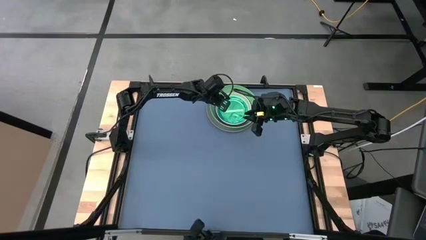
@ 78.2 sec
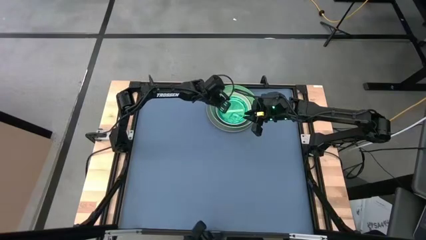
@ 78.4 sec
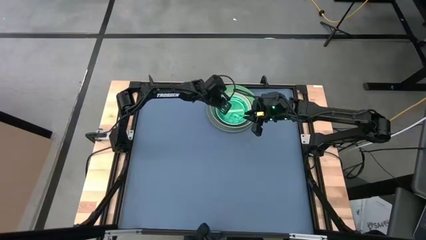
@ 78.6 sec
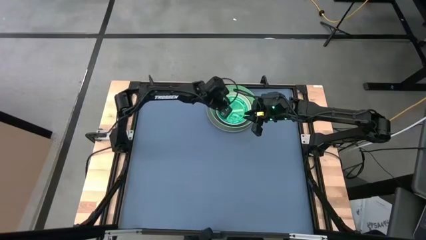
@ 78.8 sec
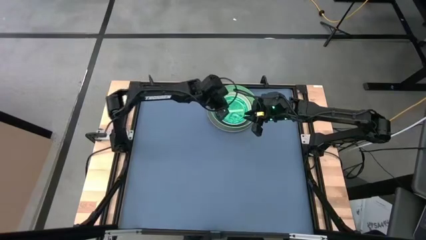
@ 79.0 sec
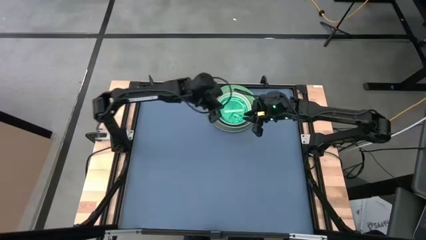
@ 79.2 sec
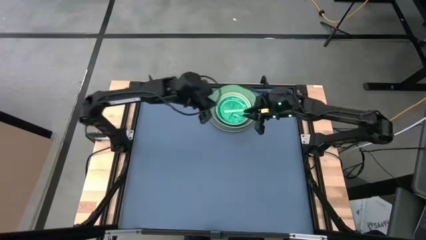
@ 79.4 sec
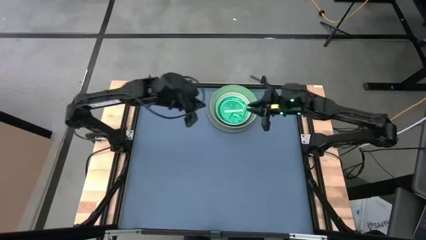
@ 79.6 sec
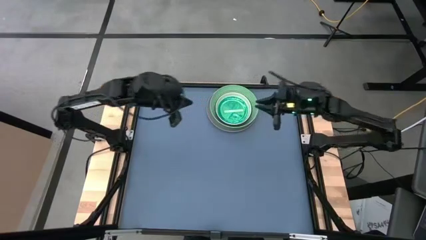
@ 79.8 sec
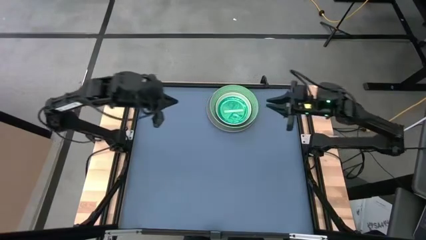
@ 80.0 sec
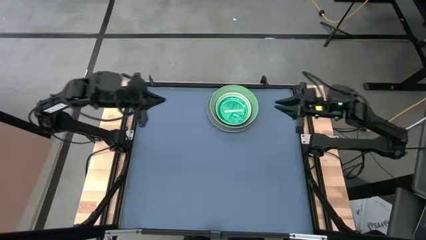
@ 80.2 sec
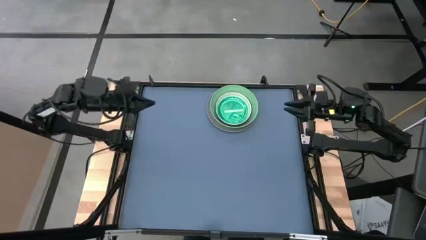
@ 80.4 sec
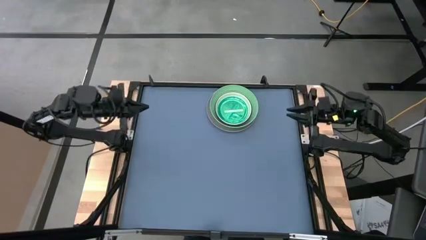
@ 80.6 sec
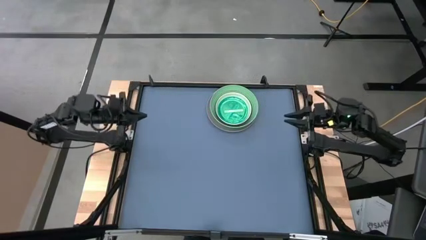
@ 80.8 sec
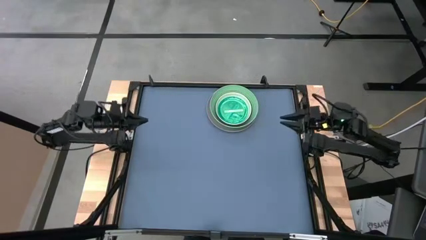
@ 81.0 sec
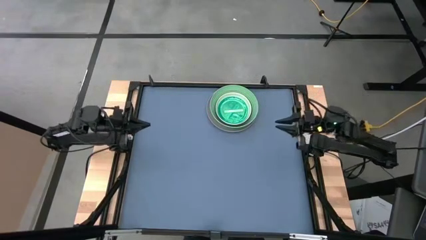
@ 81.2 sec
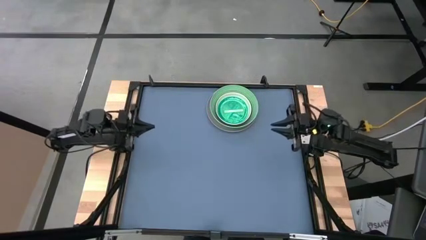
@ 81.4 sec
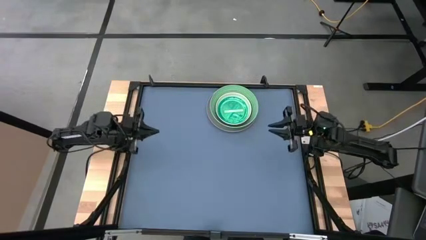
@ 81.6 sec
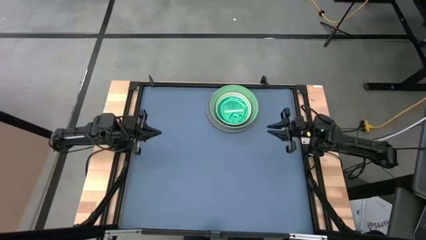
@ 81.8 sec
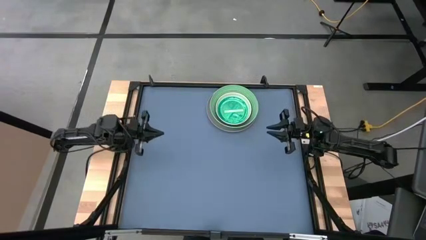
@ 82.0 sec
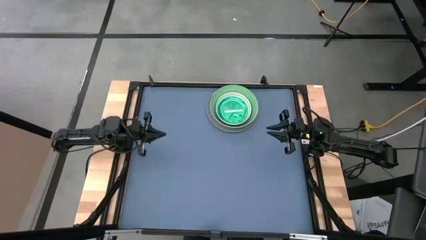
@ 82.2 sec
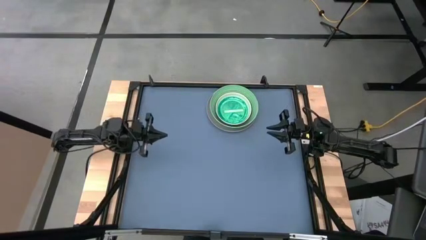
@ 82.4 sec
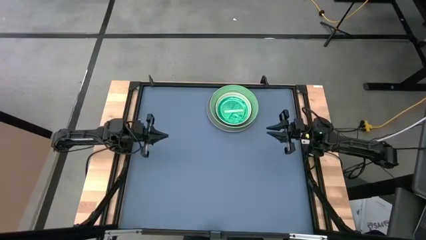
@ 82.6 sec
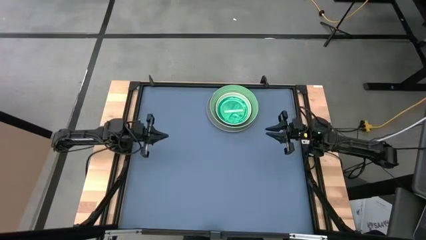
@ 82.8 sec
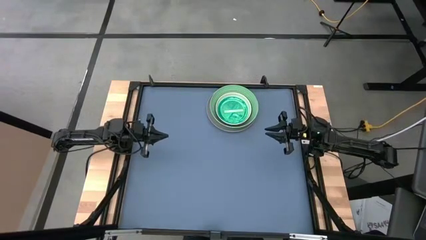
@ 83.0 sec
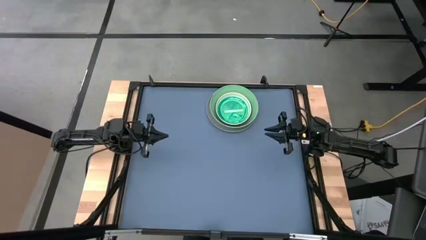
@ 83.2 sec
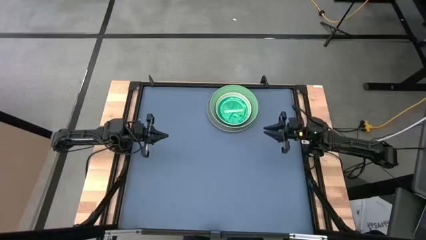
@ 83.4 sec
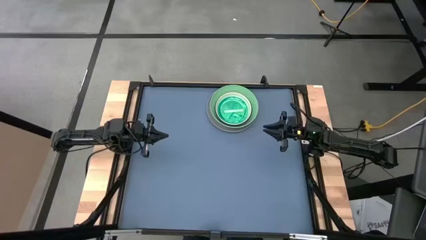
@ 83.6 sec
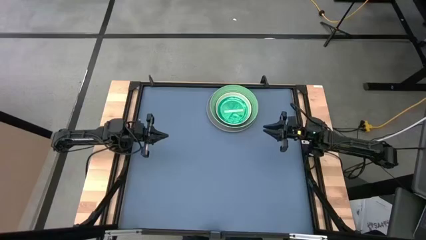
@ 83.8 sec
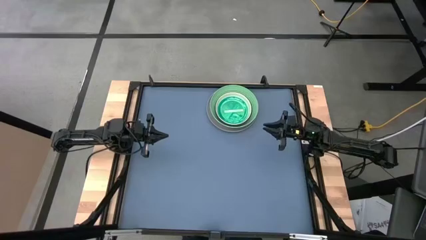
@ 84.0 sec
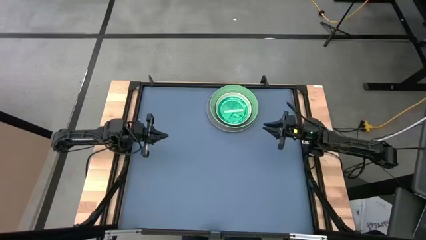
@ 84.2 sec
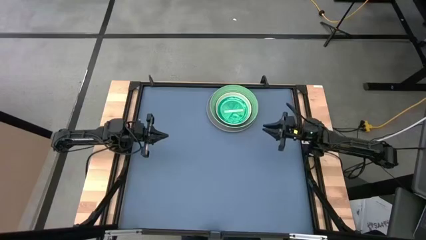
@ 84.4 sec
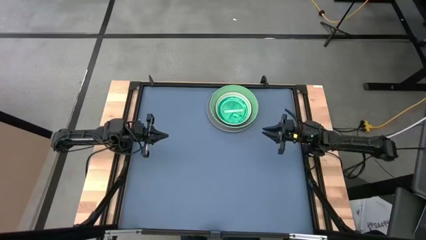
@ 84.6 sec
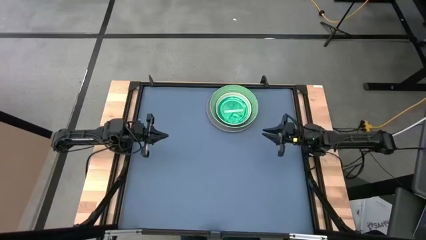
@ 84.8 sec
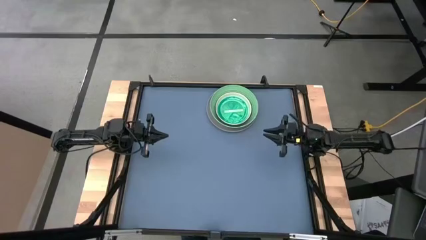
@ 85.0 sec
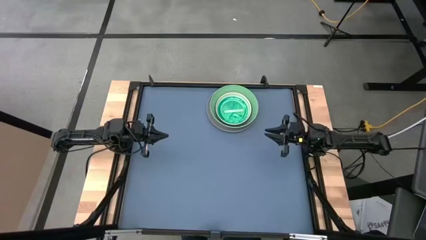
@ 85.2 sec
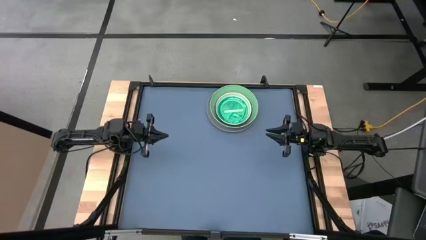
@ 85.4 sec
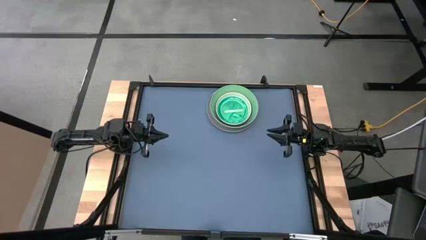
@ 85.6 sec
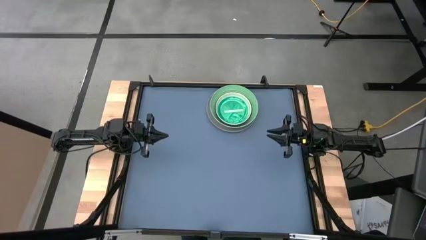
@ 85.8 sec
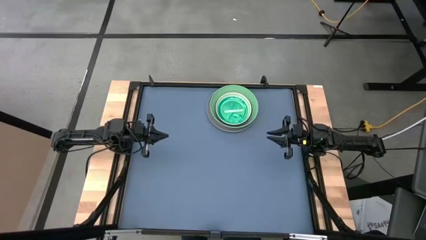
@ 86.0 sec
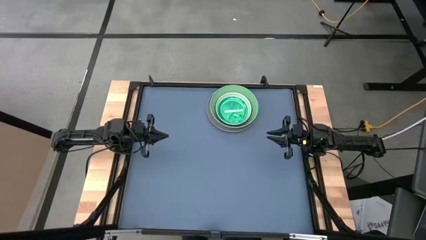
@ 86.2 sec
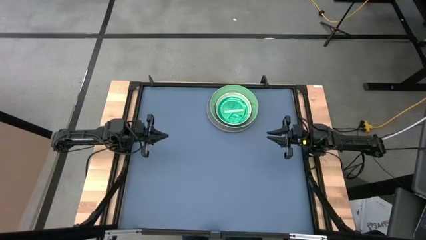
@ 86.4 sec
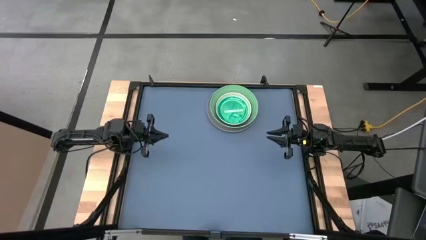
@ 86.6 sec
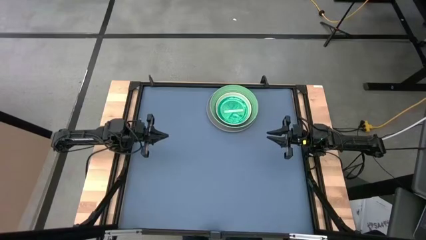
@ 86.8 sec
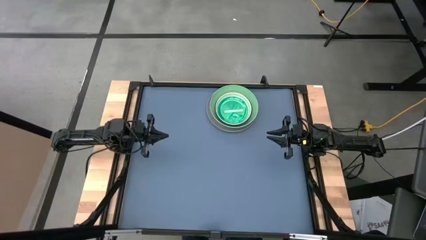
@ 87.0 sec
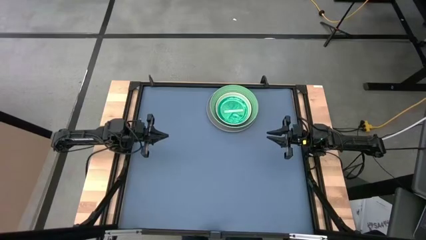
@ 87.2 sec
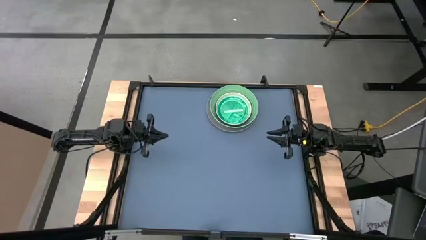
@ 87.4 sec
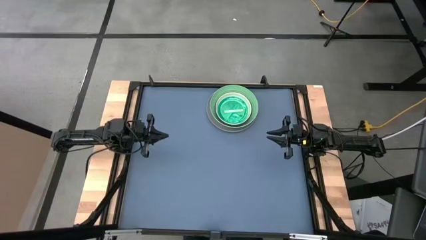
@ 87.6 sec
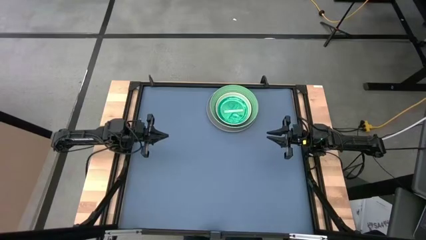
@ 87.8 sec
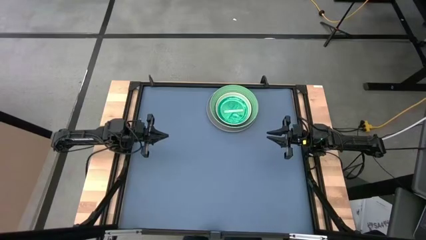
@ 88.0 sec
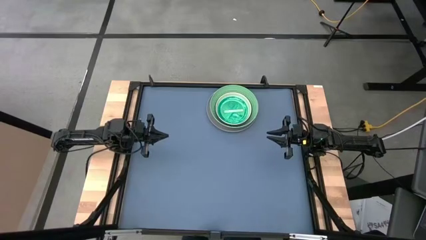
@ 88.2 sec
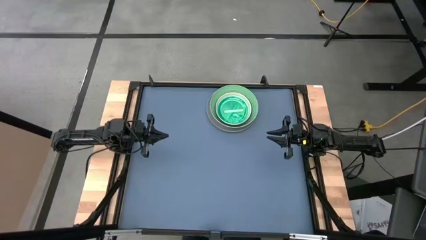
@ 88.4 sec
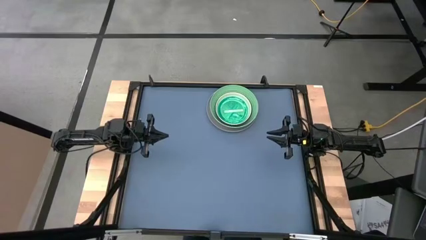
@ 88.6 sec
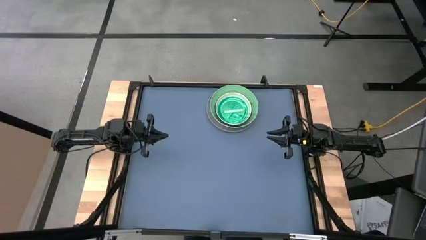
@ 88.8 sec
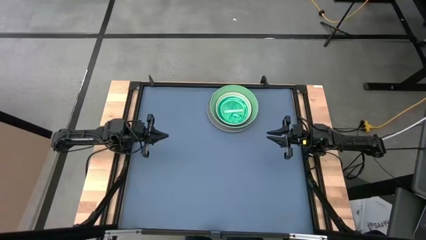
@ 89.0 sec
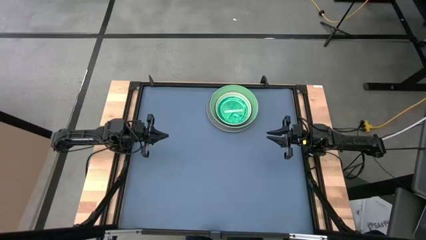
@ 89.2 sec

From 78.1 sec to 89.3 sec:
Task: Stack plastic plates
Return to Home Position

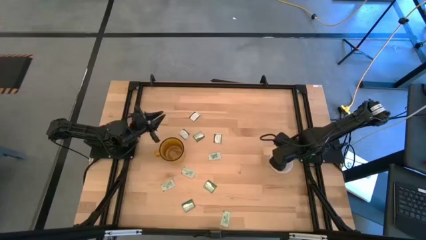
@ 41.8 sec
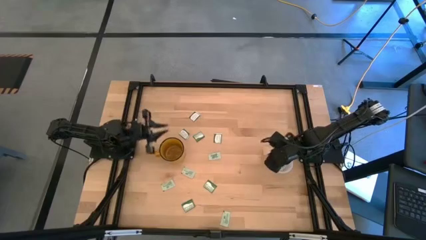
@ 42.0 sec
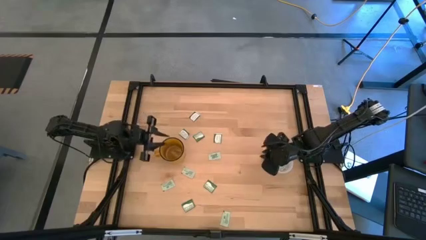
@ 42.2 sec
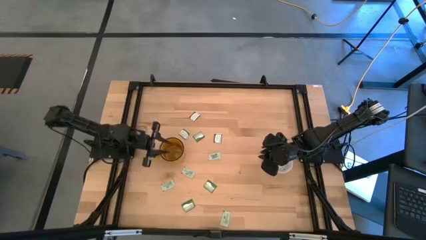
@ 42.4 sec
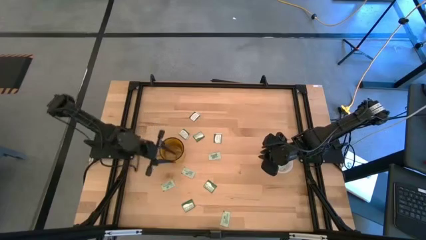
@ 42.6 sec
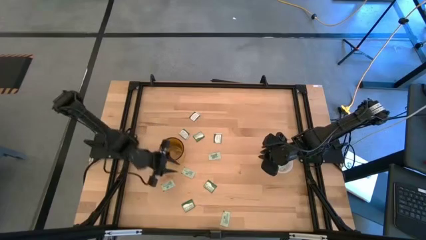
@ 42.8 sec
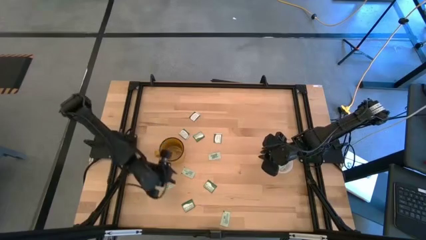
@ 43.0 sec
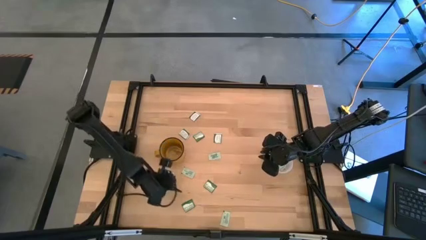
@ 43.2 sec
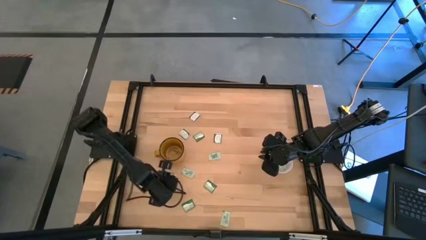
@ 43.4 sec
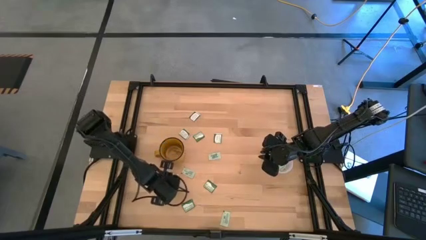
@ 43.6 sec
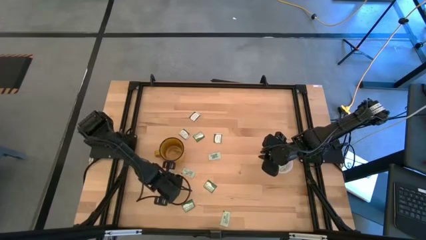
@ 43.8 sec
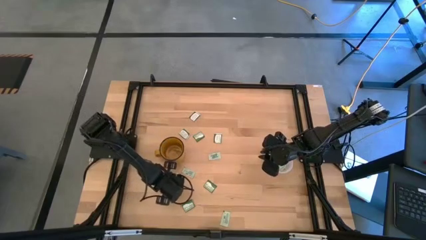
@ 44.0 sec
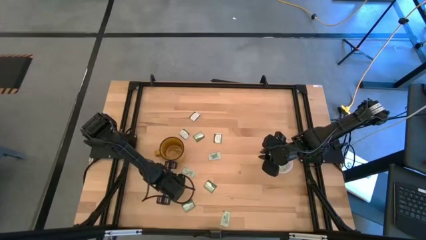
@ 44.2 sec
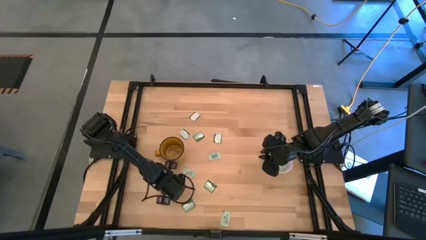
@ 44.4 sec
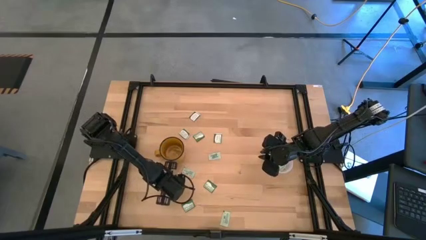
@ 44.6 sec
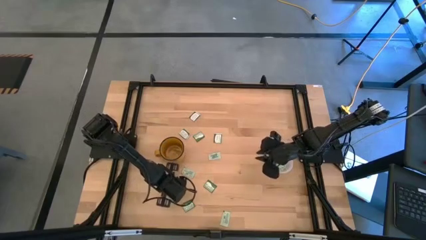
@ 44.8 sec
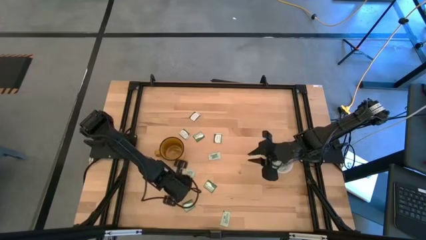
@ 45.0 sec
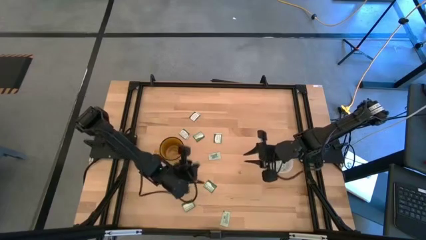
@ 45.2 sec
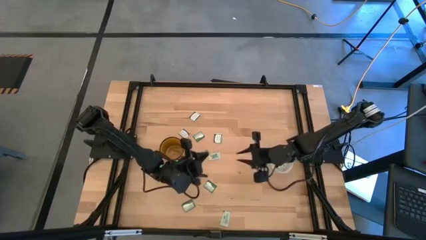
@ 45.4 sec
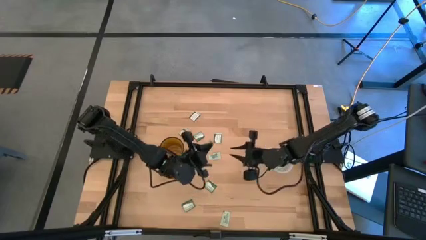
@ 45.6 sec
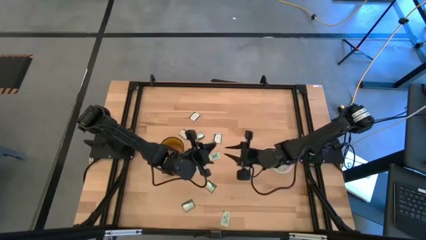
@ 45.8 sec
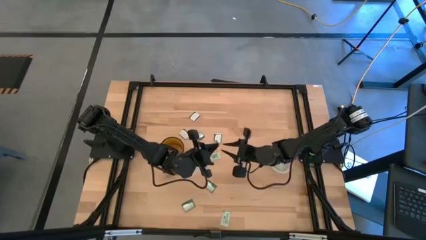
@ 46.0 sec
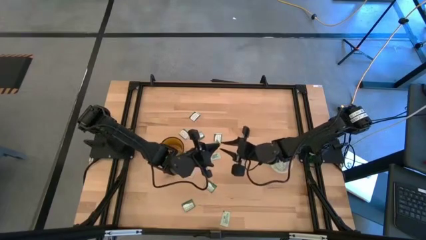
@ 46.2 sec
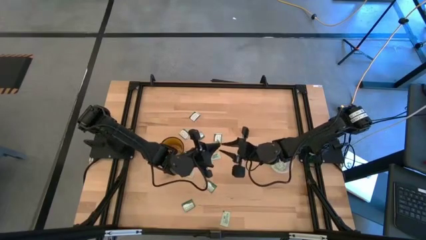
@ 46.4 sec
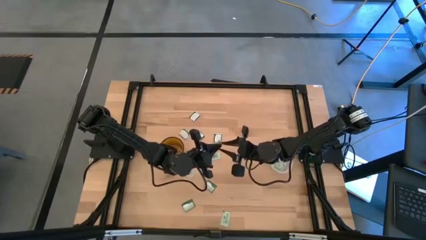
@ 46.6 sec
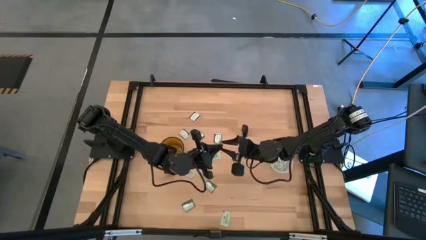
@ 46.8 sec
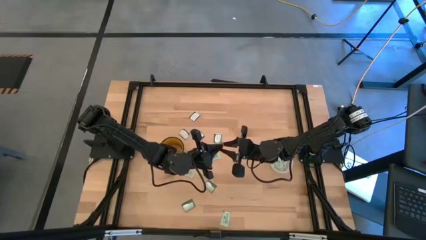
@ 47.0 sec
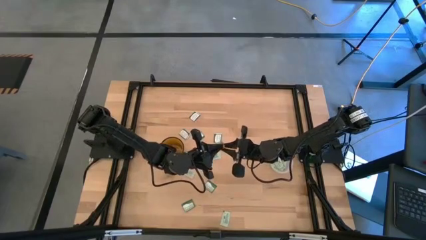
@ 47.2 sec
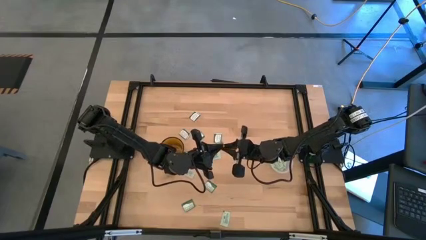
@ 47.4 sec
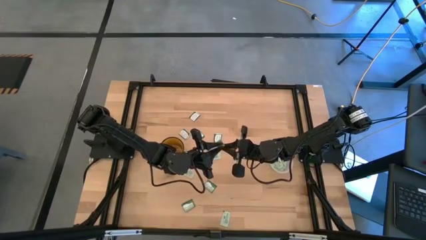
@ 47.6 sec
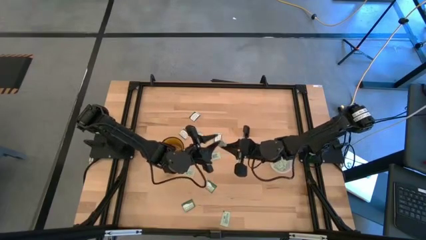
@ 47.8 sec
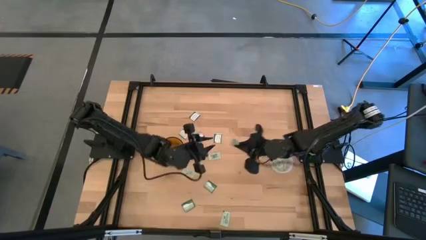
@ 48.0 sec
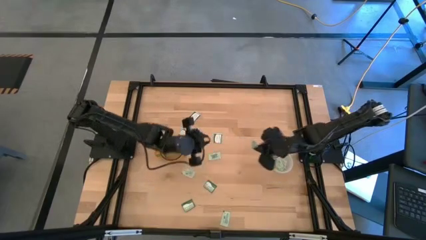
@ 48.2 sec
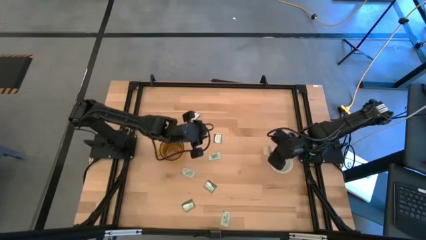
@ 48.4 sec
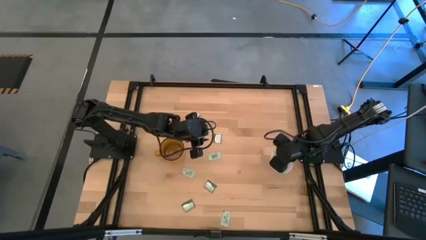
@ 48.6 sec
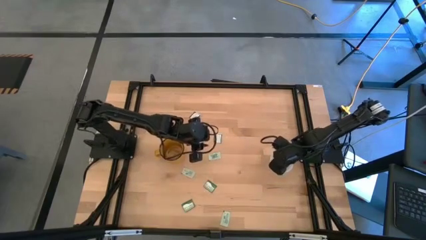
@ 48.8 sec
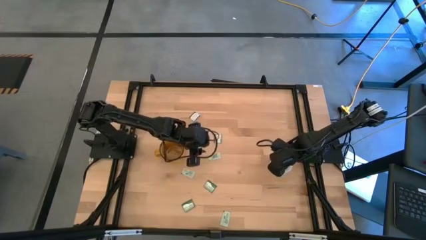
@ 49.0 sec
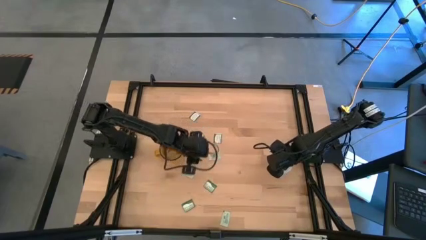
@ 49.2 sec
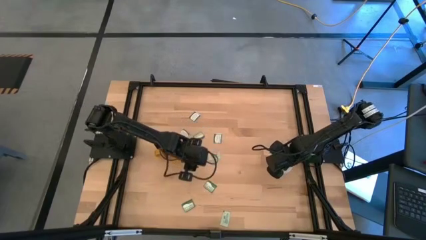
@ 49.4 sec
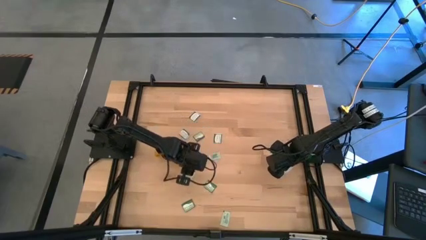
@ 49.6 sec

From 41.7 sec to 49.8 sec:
Task: Pick and place Stevia / Truvia into bins
Put the green stevia packet into the transparent container
